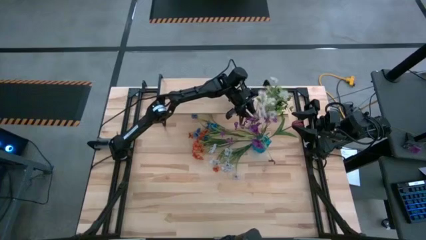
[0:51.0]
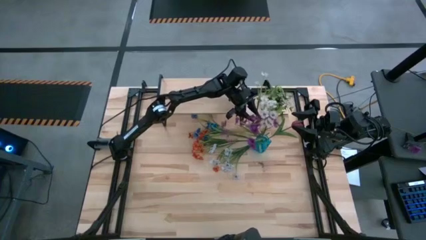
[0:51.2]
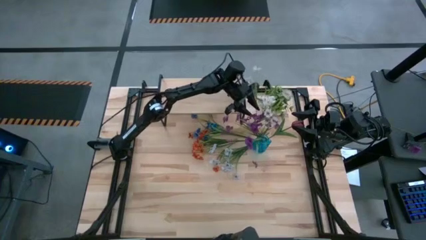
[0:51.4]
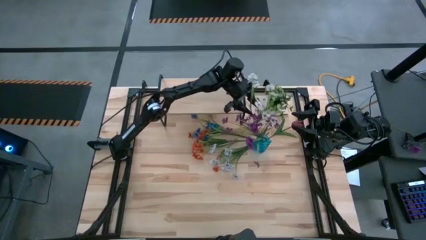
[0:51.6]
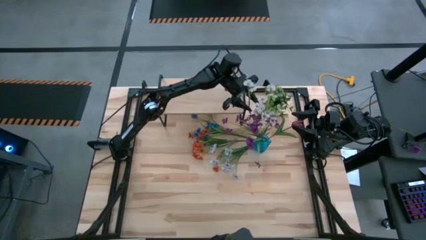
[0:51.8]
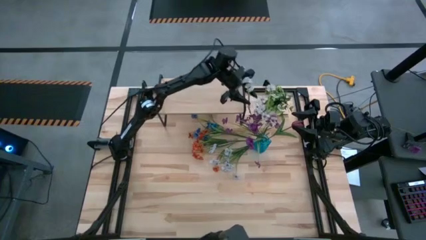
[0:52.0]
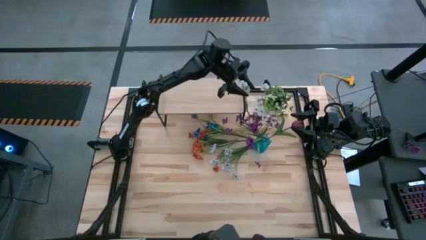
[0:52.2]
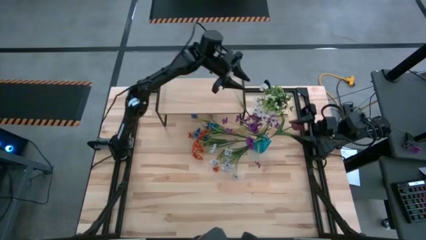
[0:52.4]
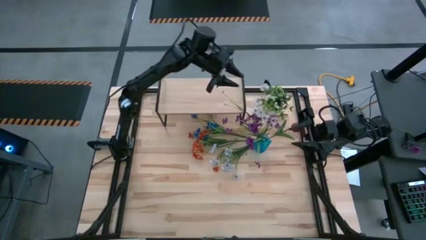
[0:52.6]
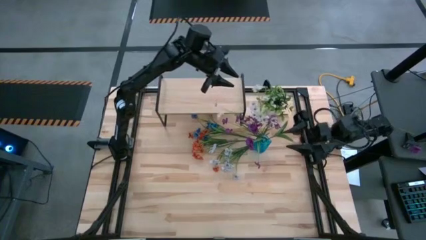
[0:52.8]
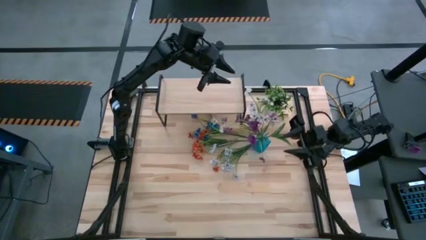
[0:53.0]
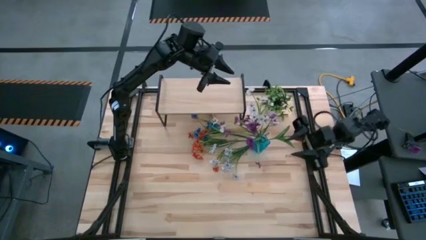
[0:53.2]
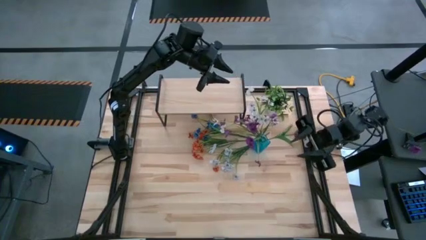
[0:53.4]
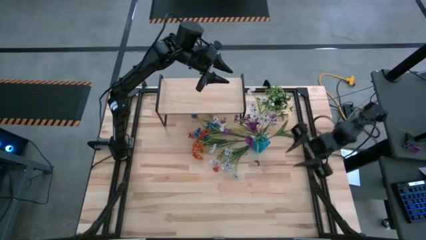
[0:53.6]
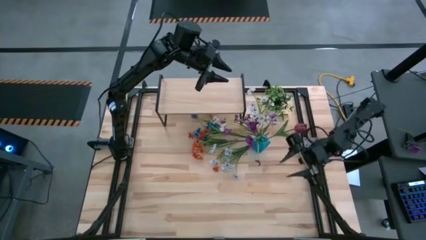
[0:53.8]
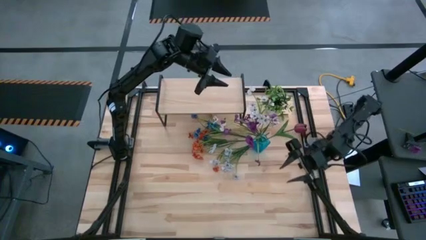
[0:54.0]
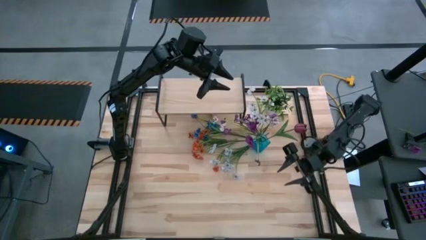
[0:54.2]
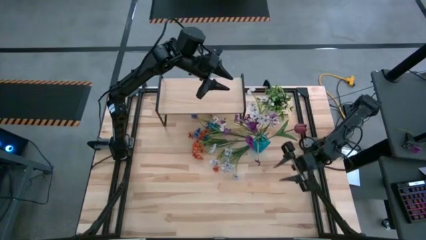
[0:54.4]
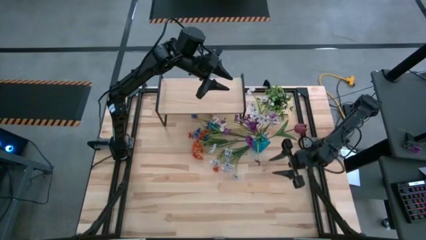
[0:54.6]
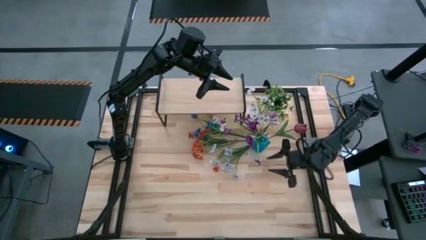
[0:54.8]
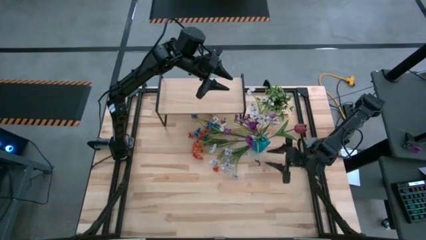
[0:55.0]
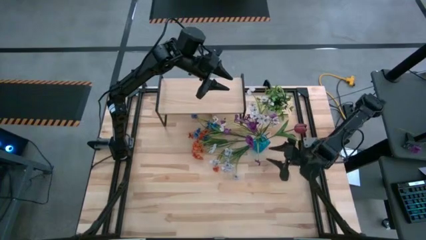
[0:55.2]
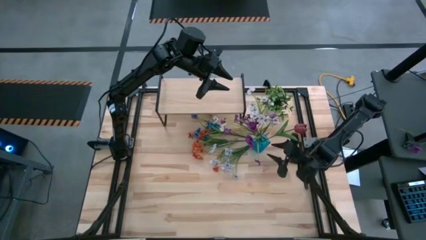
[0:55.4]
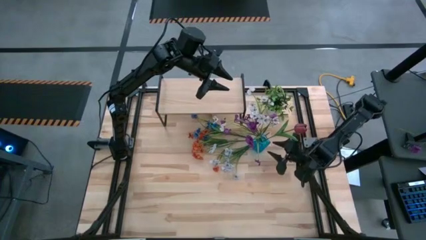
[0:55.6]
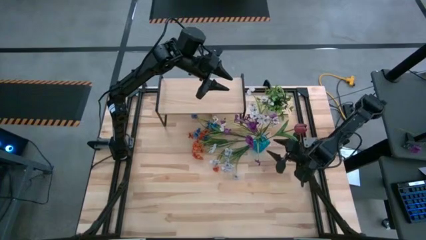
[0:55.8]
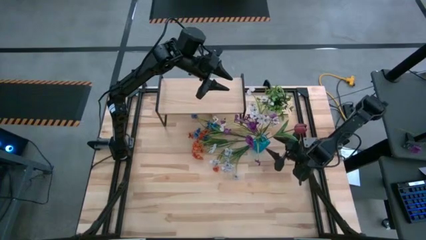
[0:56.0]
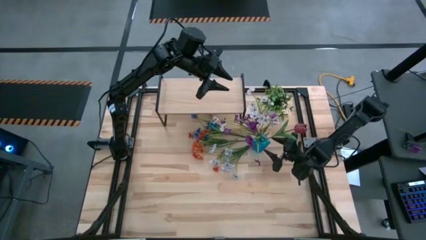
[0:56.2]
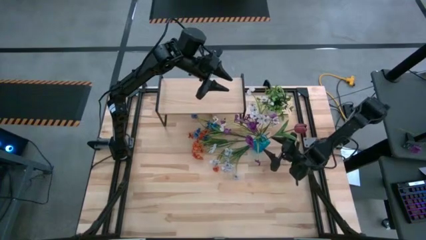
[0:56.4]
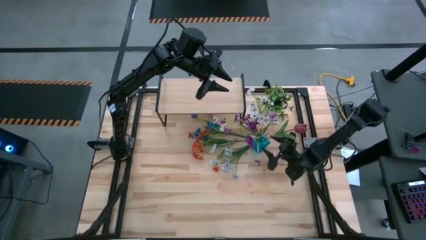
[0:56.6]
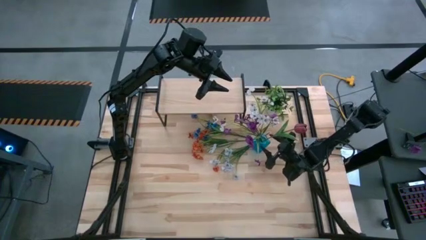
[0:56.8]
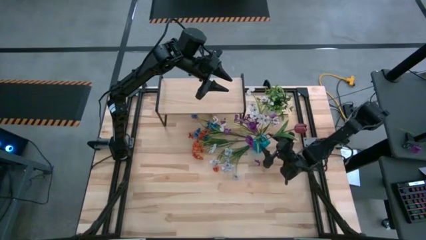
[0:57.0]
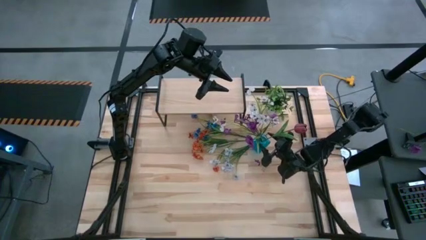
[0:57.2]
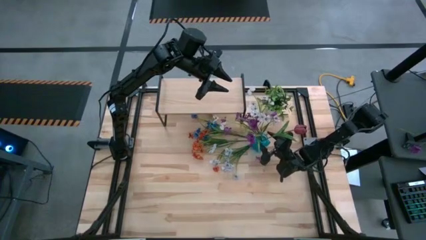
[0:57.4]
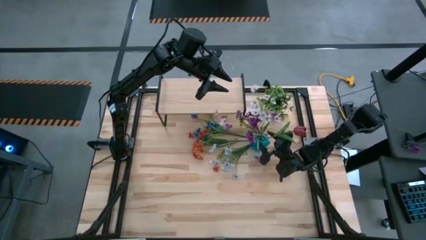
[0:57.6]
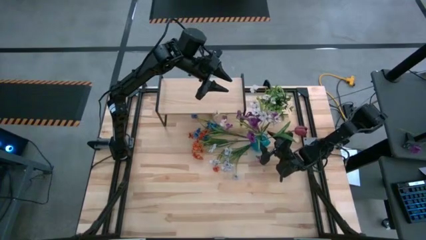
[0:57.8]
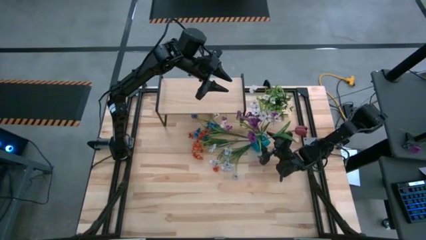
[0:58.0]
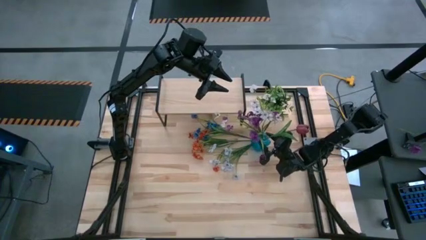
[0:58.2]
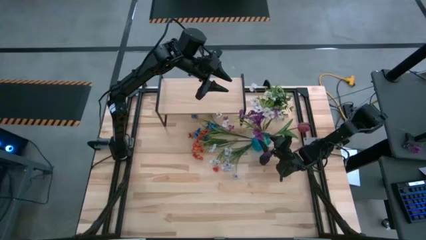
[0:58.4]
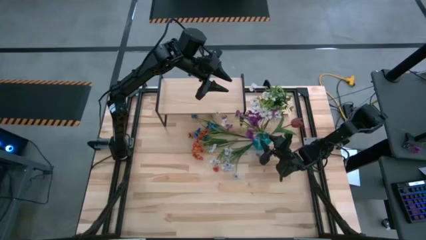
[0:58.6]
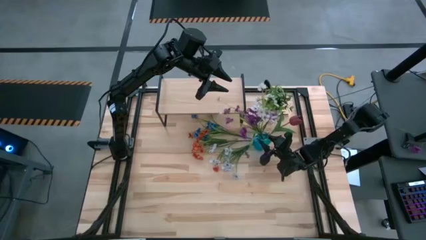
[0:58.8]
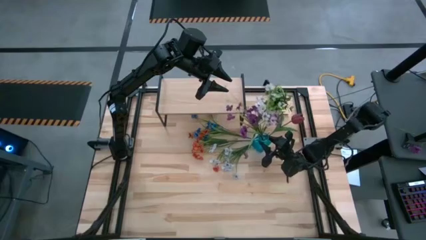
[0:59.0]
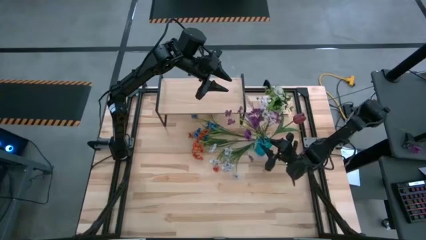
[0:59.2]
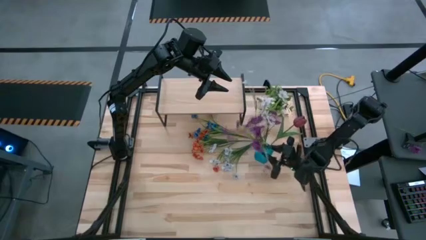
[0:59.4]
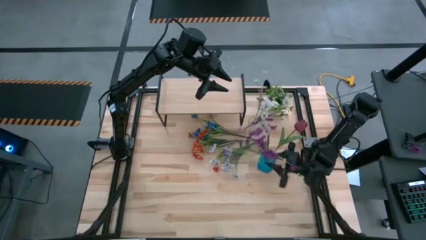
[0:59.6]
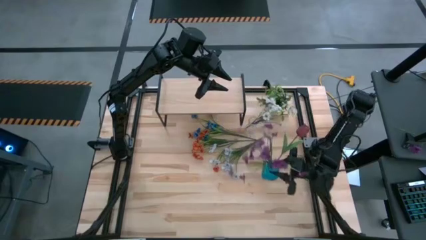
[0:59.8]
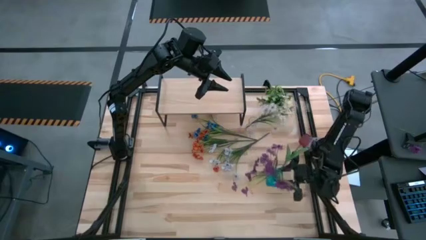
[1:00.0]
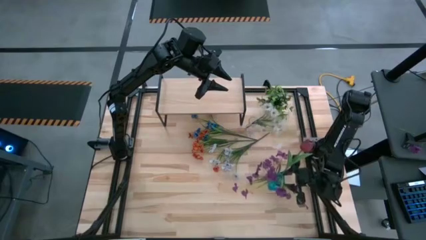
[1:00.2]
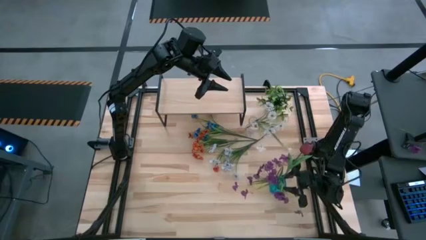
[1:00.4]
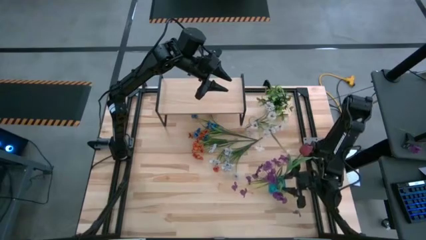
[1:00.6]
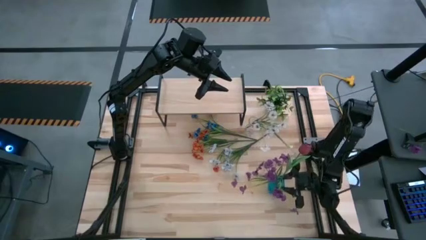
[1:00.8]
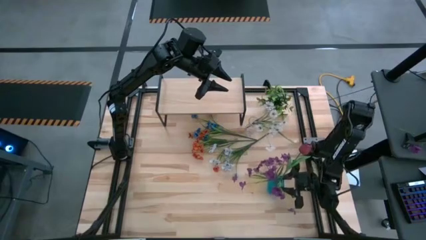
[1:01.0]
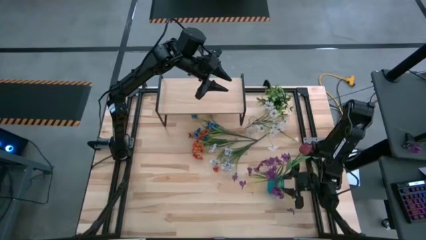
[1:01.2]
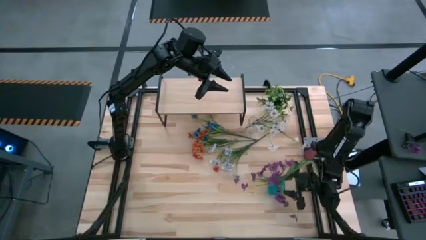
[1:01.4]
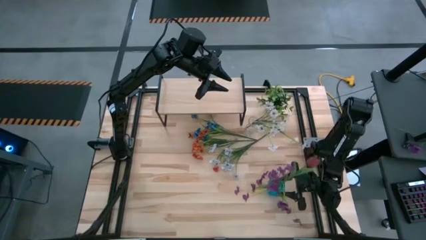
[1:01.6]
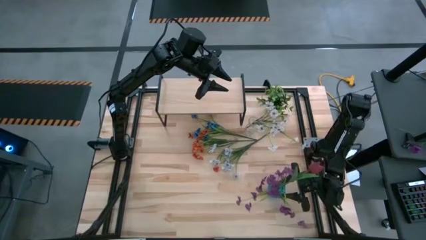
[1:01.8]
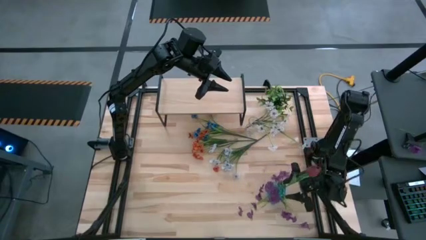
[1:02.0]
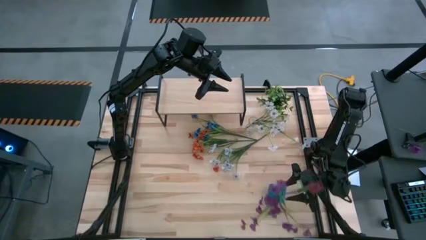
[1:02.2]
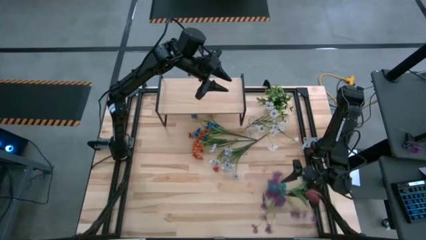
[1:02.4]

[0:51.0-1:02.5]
Task: Pick and place flowers into a vace then onto a shelf
Move the blue flower vase from the middle left to the bottom right of the table

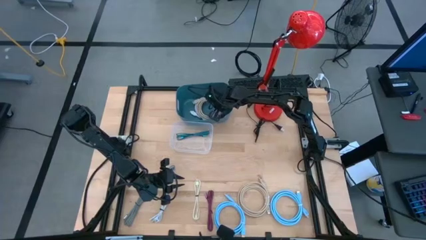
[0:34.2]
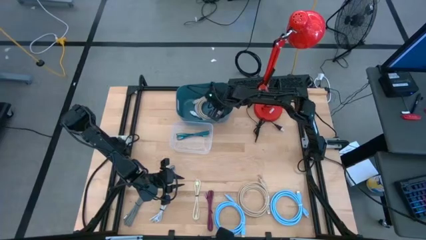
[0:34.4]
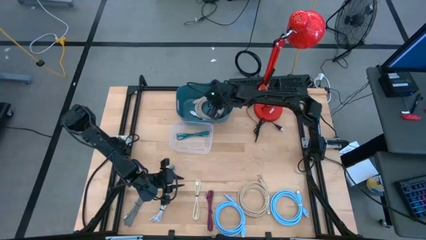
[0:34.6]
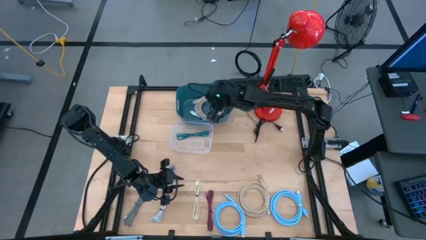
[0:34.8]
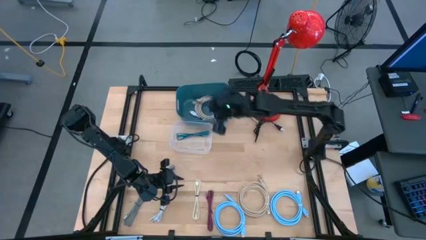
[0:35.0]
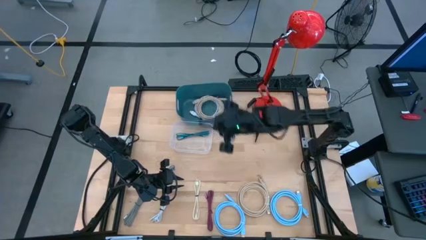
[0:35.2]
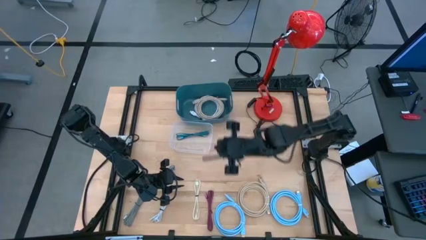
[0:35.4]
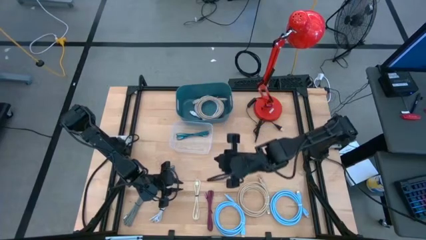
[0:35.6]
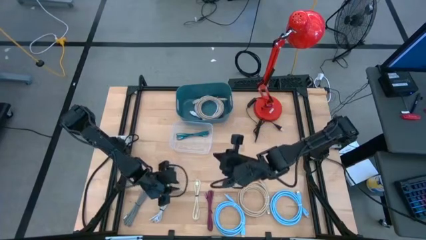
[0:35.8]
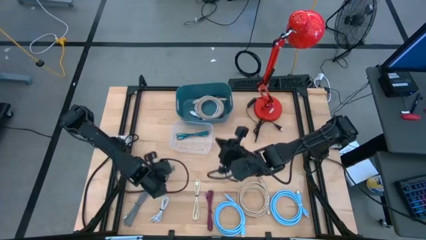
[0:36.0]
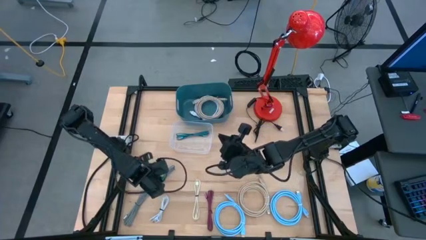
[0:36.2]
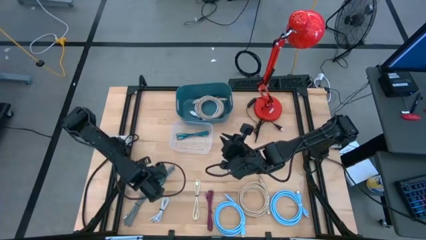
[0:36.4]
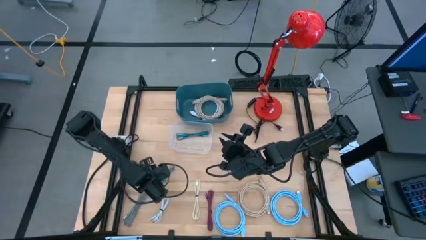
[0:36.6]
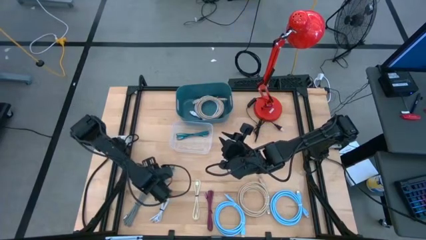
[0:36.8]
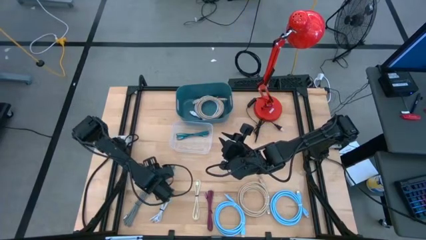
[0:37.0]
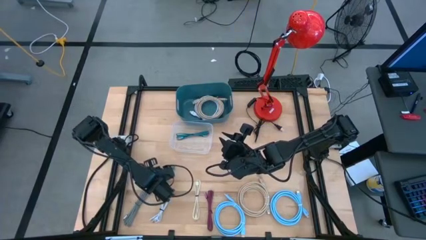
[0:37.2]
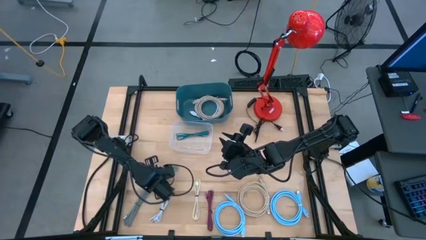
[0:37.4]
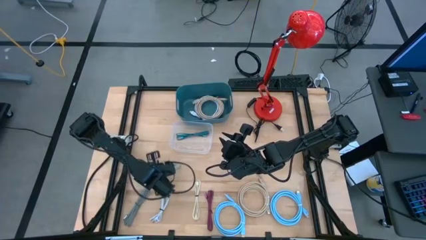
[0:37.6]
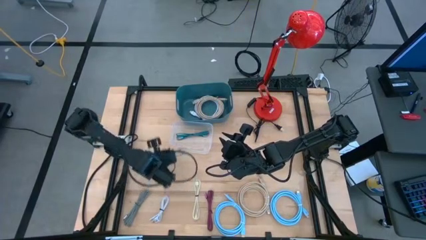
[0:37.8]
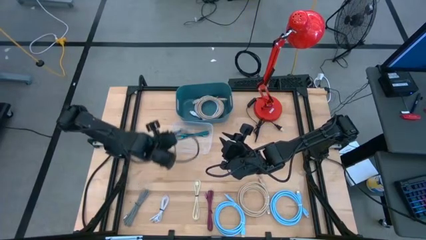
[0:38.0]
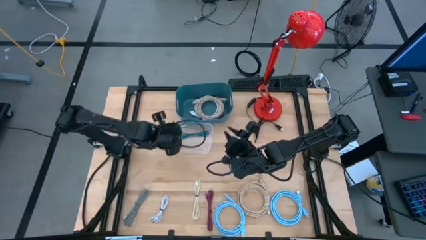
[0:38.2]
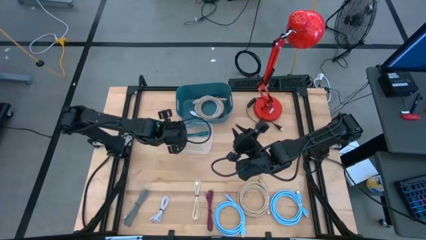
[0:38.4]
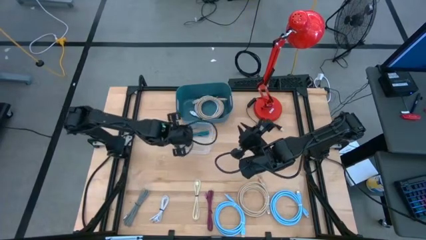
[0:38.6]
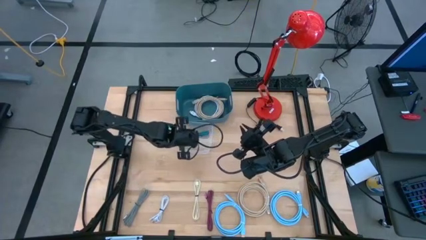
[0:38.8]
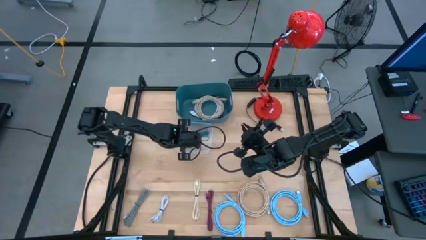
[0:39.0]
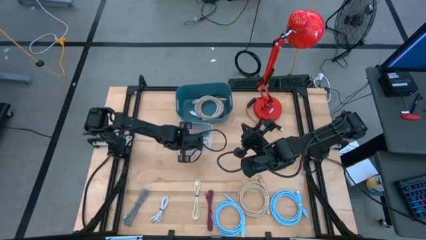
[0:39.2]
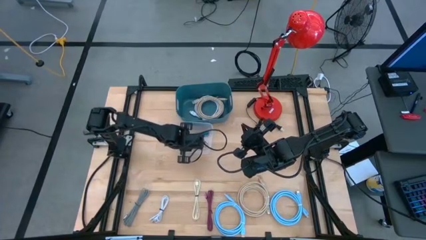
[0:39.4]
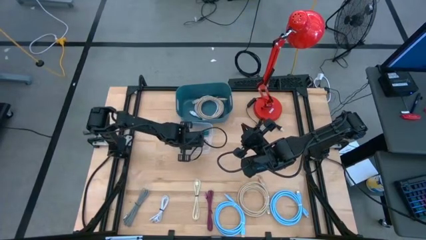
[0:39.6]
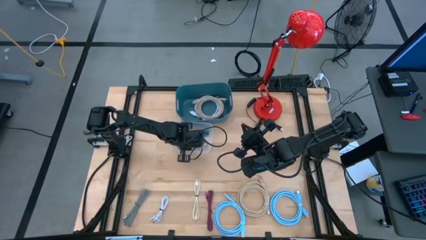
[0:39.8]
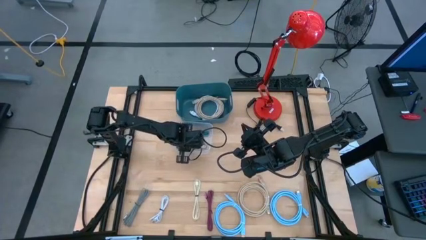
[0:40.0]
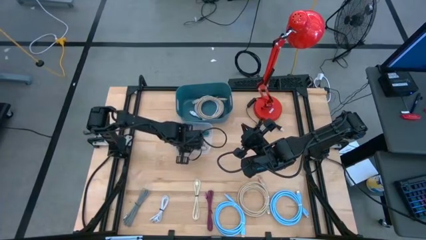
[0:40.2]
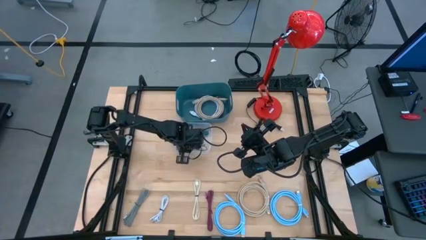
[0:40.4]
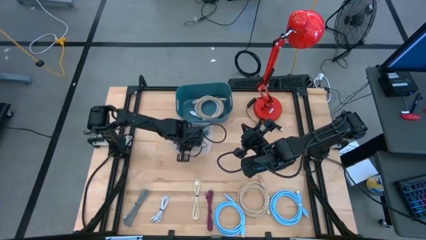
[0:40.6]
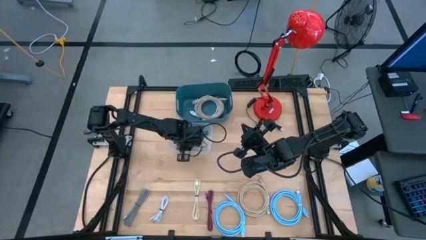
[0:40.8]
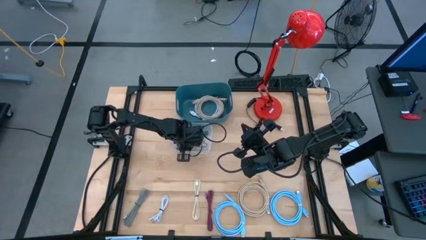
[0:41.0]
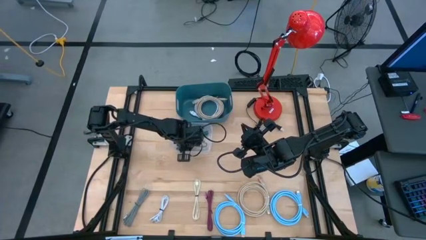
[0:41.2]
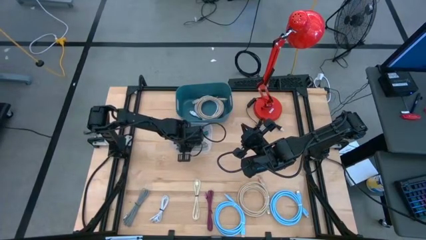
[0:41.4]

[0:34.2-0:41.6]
Task: Pick & Place USB Port
Put the blue charger cable into the transparent bin
